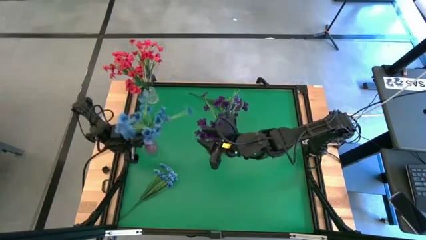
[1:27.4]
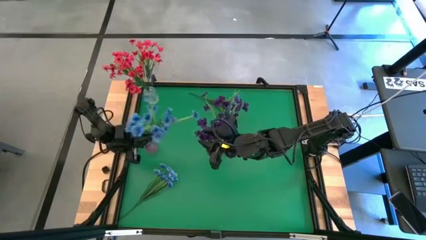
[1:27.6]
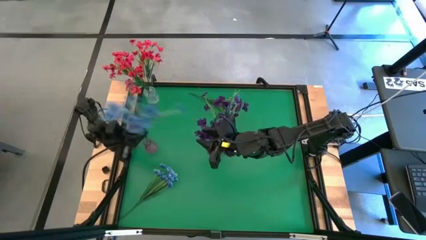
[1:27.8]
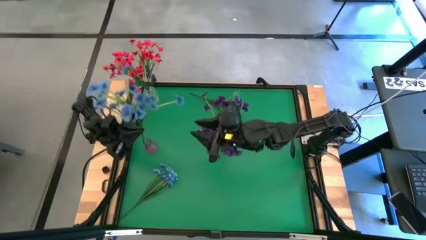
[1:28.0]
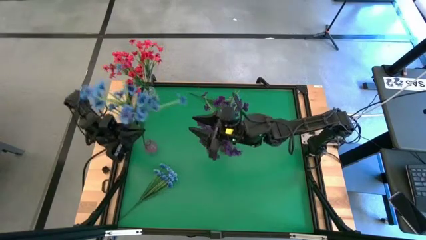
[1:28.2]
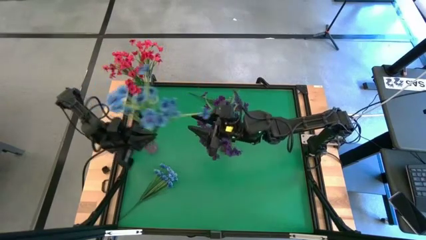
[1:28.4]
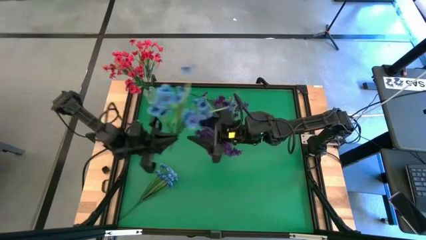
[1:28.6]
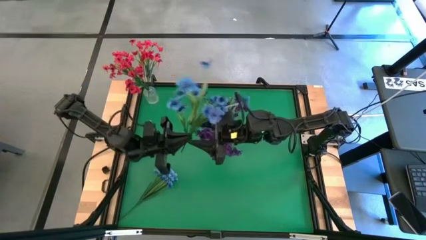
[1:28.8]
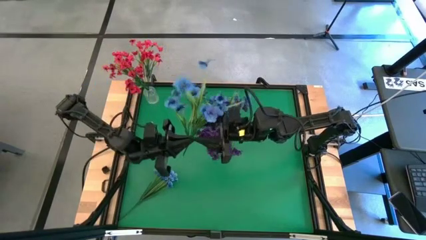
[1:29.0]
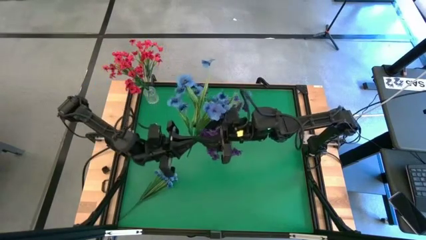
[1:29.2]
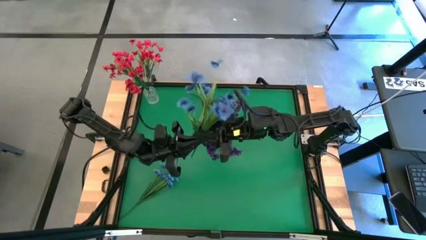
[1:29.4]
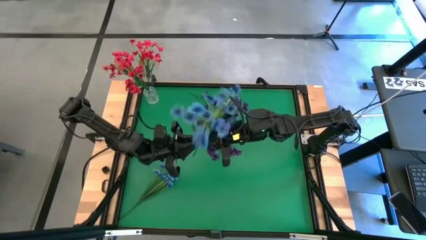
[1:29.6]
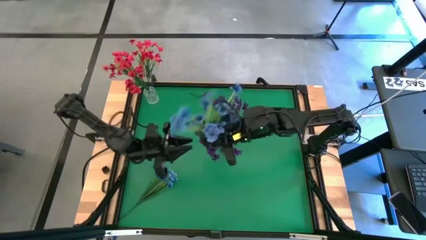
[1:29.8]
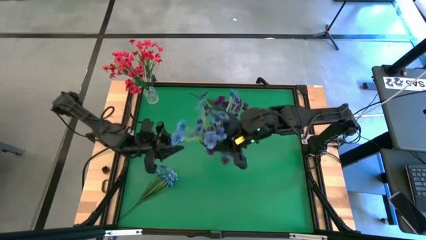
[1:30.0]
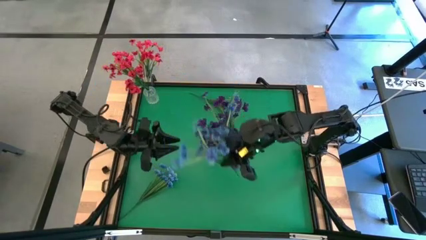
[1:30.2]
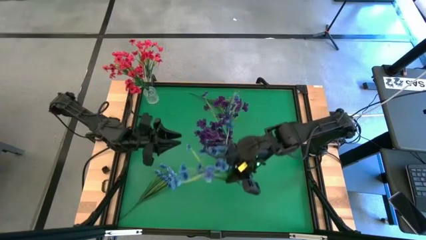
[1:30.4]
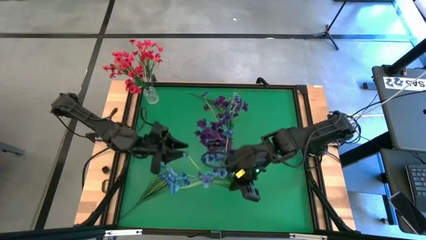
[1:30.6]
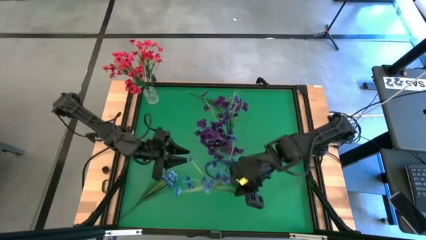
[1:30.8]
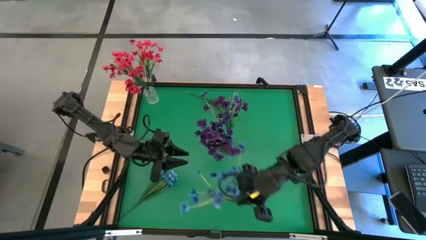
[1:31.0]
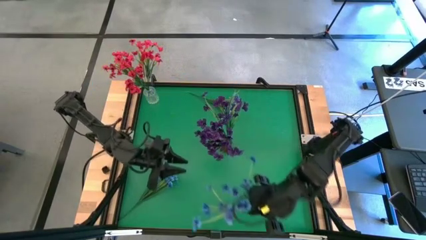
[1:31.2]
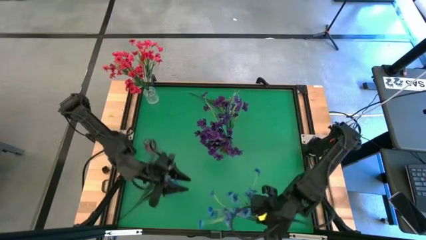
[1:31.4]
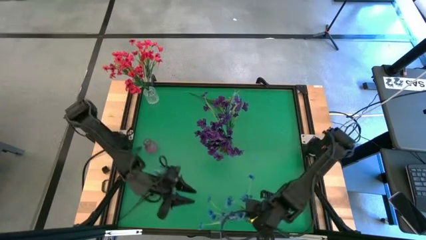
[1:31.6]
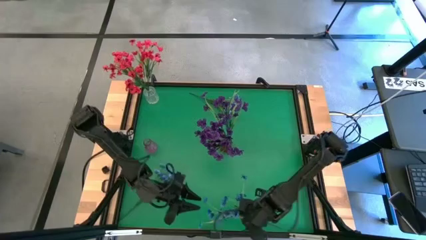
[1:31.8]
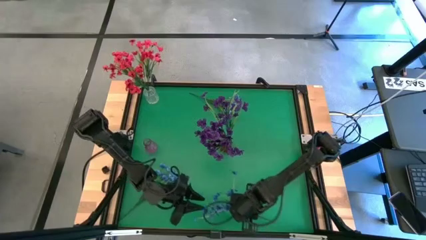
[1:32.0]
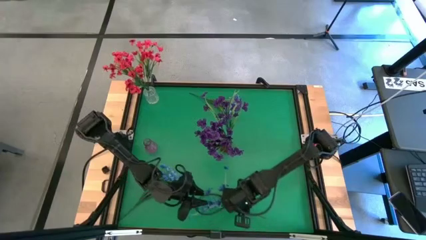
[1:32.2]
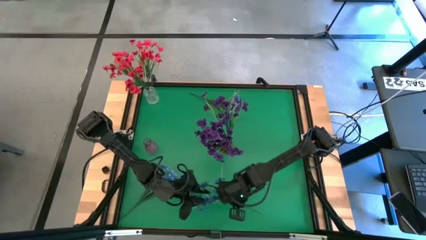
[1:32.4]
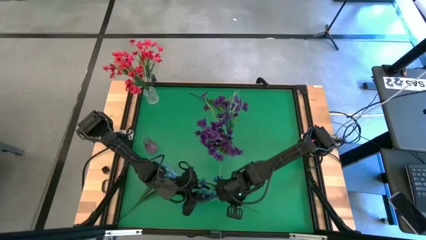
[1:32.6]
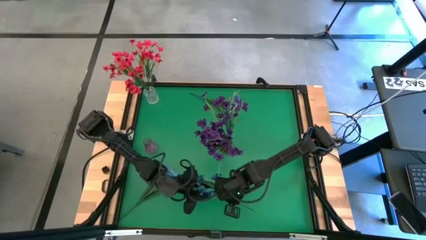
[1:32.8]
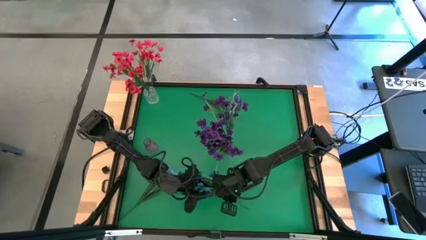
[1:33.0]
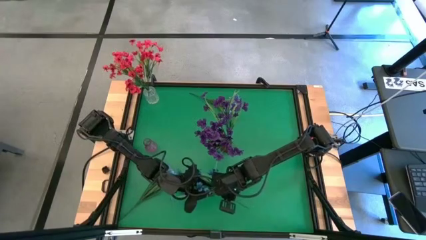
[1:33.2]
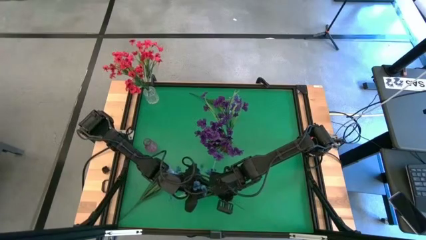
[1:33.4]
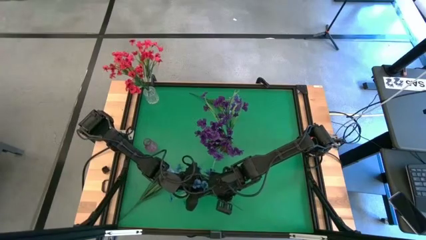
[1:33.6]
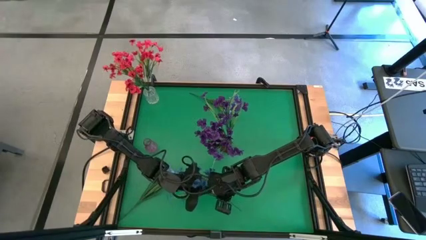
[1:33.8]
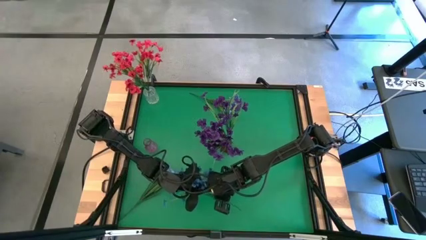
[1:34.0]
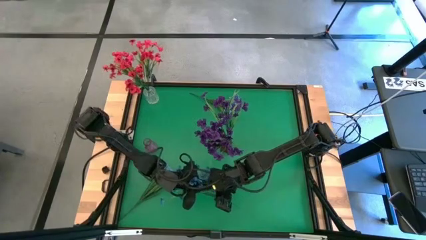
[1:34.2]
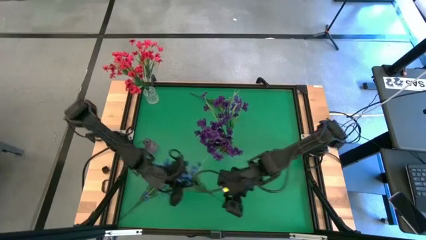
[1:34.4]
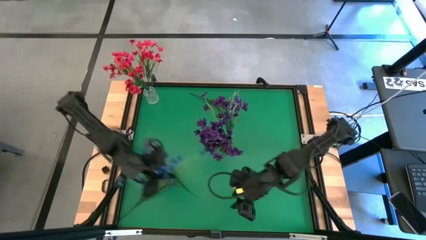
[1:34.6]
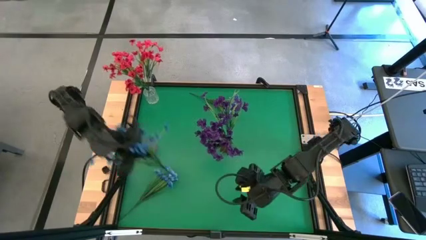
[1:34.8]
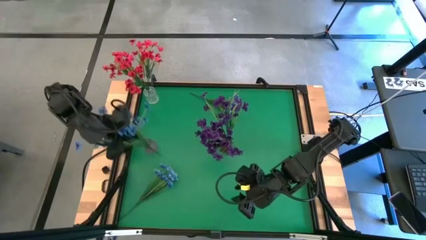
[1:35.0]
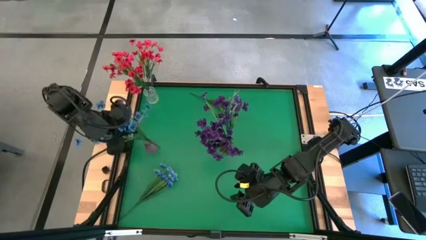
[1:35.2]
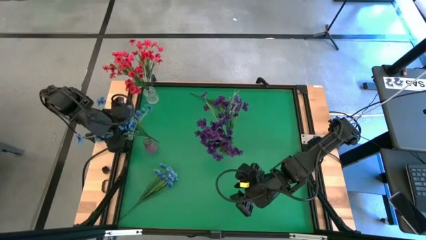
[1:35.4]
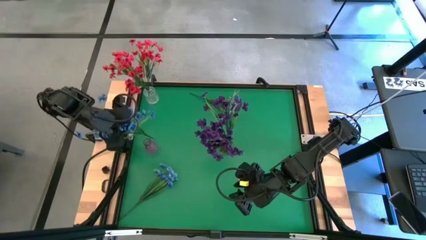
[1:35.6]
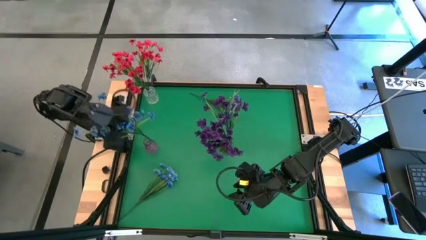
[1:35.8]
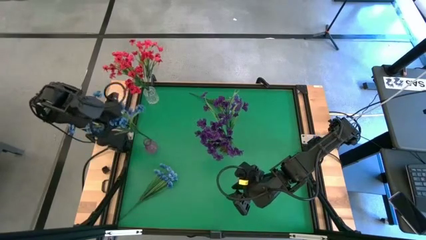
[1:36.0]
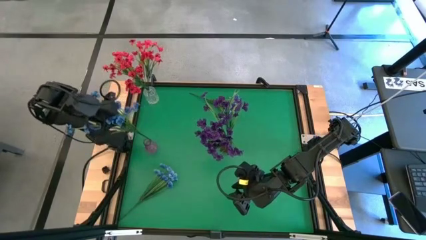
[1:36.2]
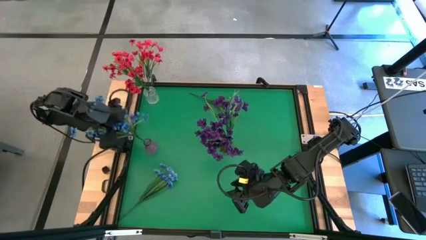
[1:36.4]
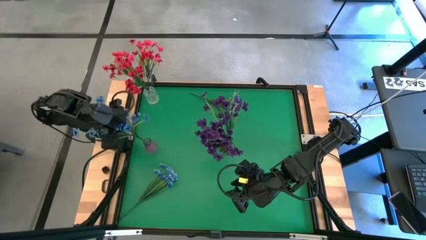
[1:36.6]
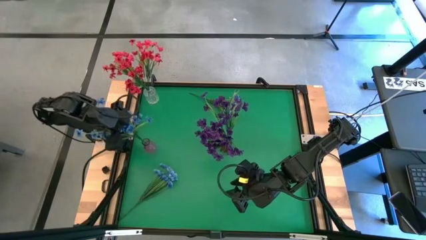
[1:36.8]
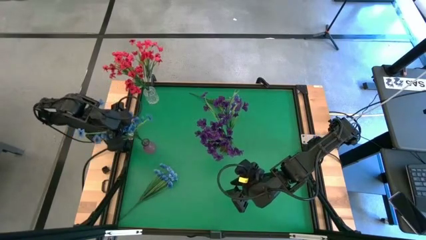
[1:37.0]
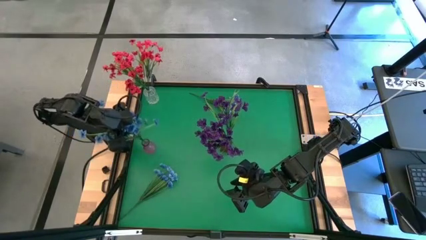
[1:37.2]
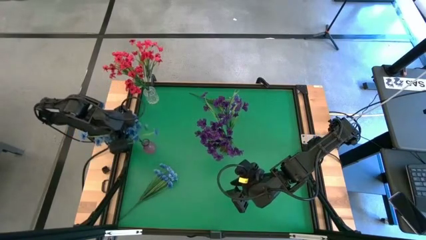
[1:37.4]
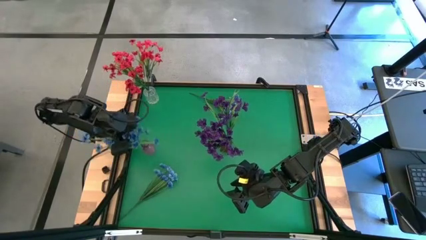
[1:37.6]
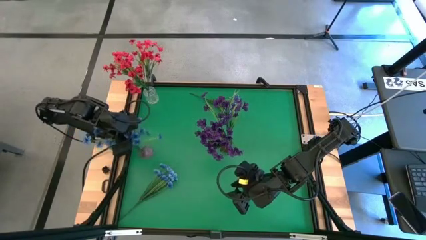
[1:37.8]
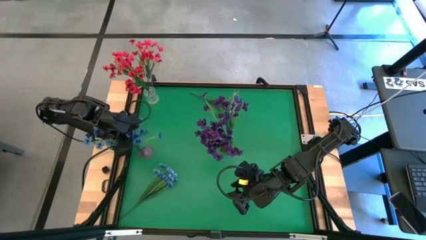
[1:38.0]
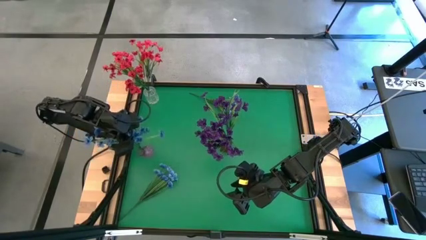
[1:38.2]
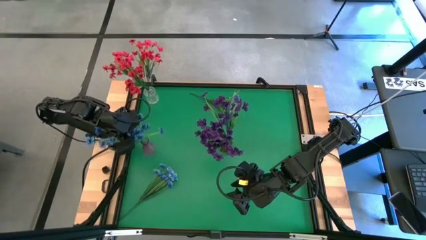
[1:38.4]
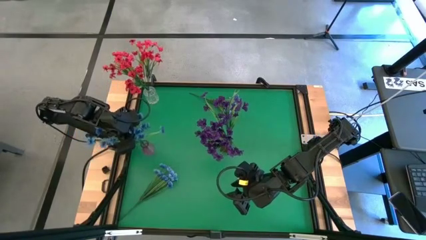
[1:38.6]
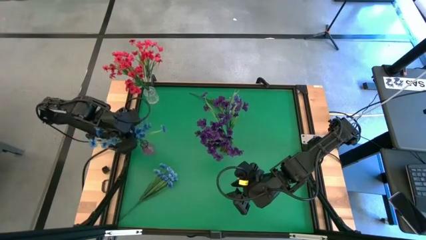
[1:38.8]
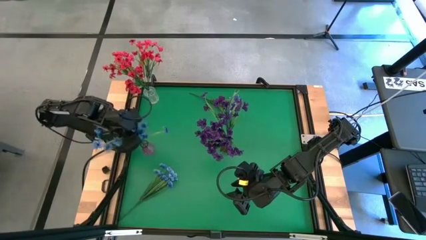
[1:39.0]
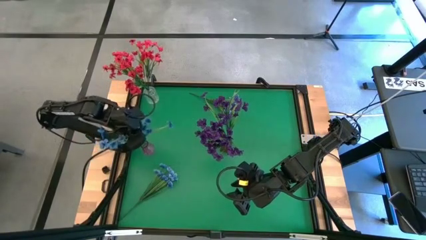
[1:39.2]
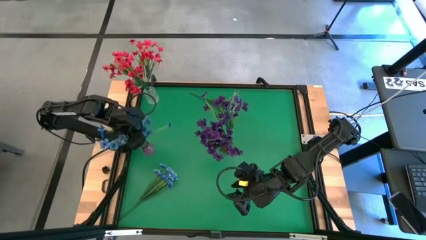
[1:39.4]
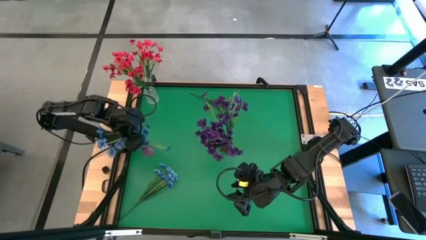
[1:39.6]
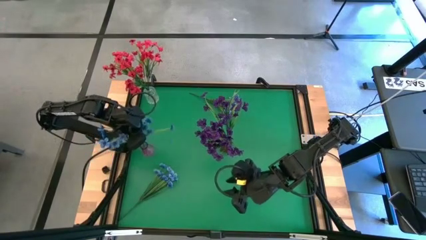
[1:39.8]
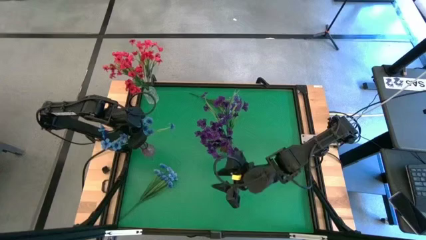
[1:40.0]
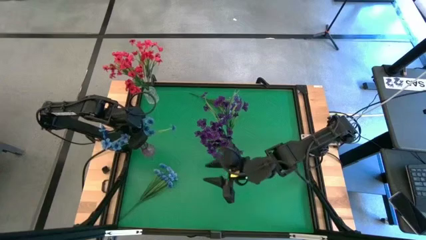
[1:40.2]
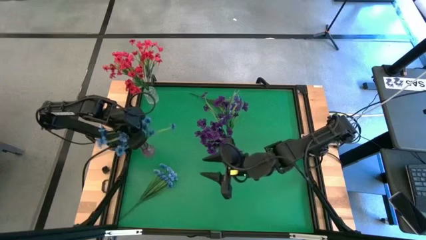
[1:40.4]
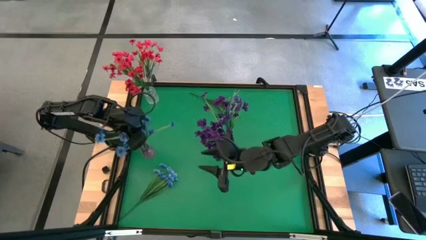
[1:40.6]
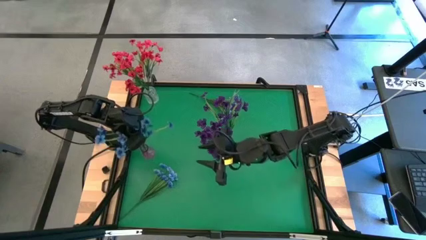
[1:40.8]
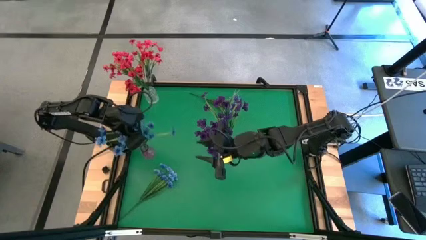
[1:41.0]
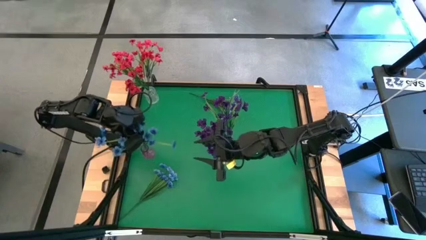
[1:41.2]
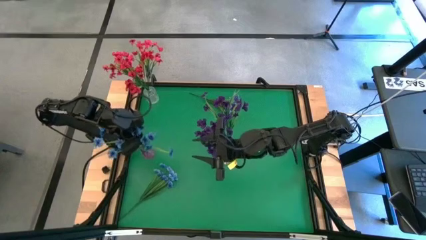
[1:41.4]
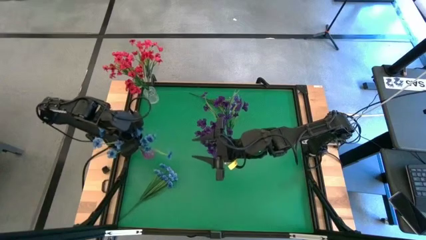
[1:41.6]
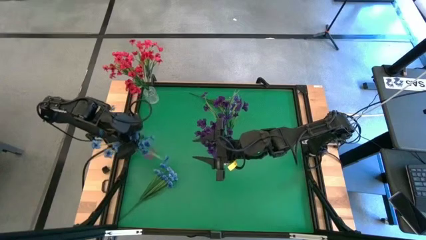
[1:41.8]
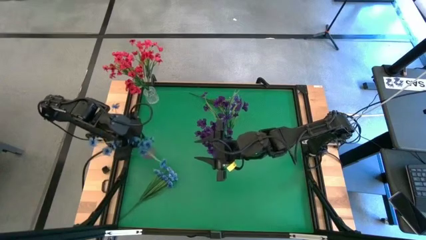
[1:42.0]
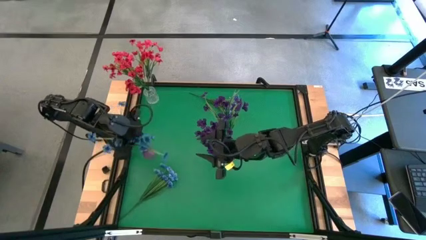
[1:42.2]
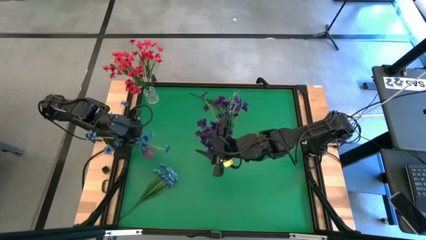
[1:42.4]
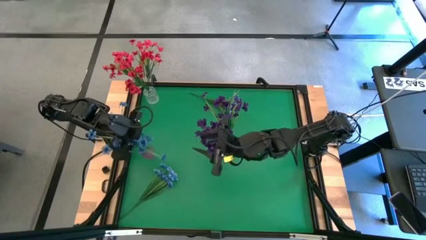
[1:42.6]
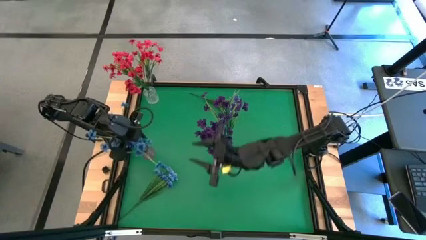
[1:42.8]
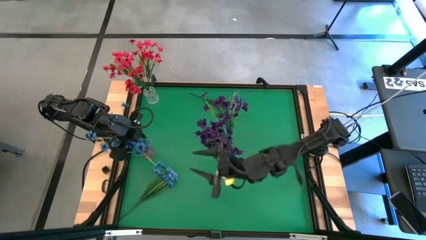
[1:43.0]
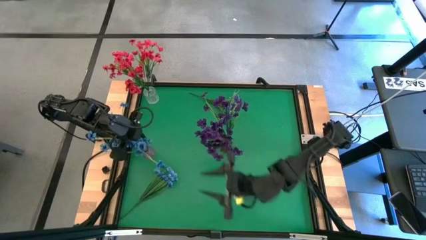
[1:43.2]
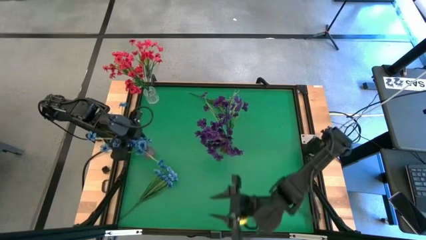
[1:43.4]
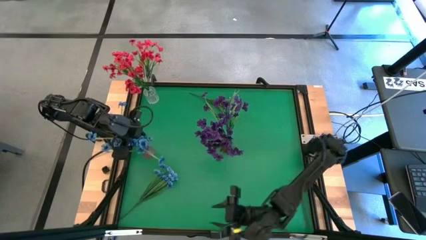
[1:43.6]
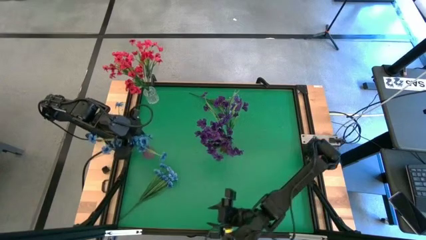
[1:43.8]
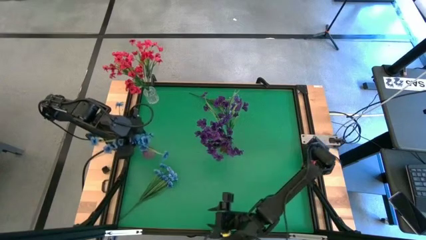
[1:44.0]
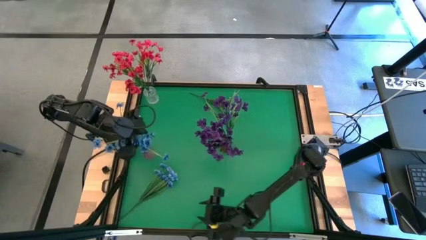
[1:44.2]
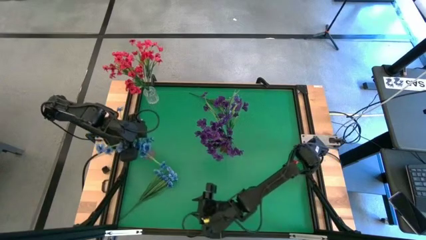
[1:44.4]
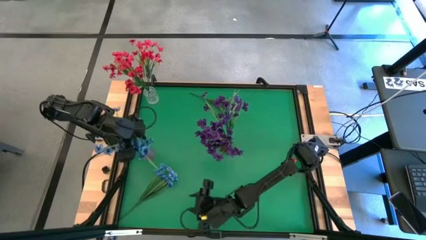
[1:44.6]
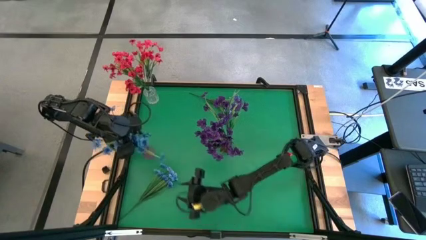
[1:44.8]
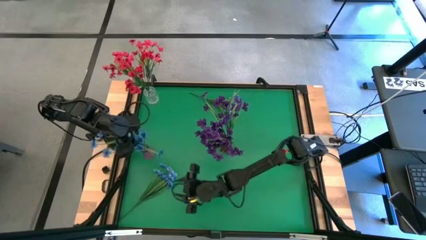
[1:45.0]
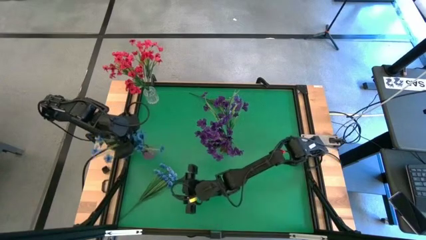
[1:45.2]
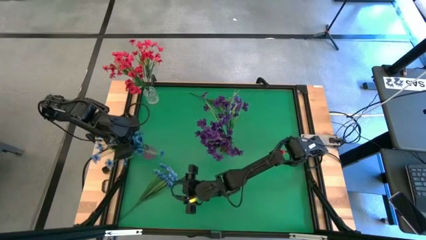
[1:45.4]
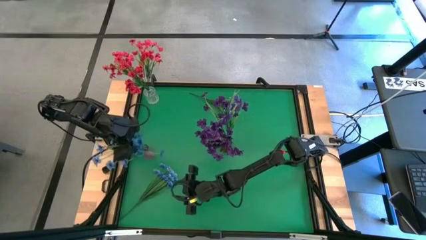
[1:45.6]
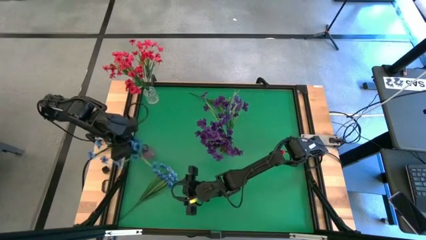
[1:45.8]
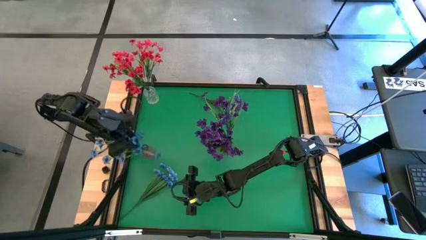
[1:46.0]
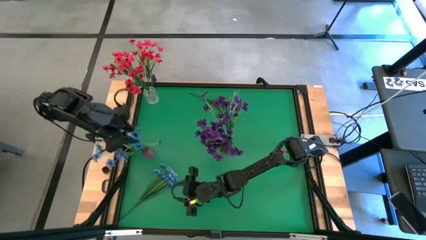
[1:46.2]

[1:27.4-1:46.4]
Task: Sort flowers into vase by color
Put the right blue flowers into the violet vase
